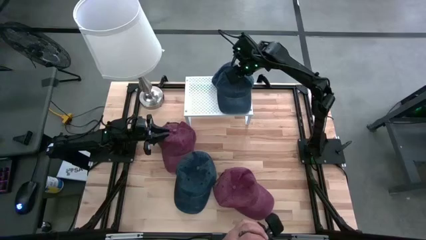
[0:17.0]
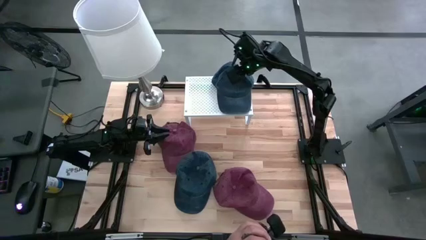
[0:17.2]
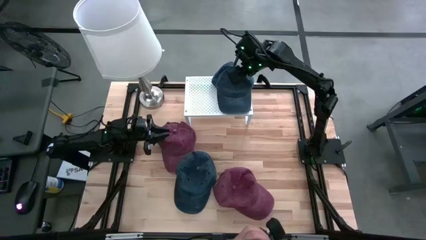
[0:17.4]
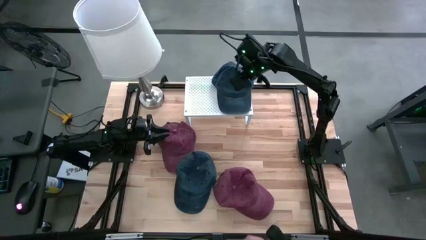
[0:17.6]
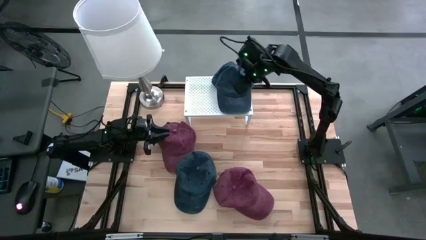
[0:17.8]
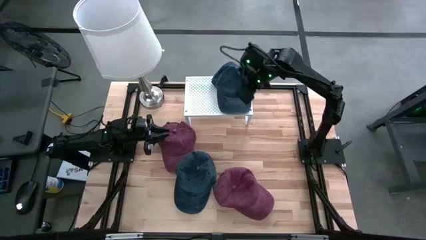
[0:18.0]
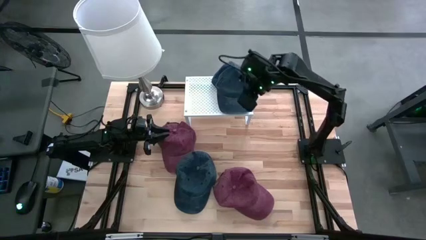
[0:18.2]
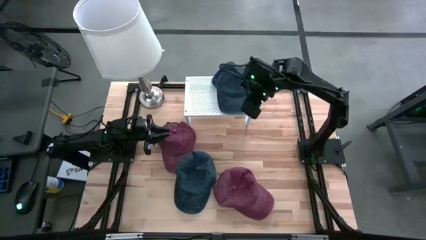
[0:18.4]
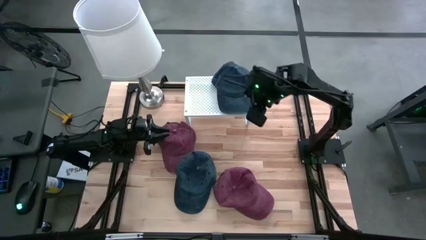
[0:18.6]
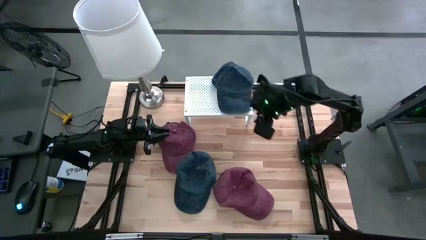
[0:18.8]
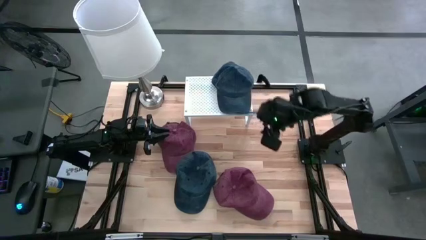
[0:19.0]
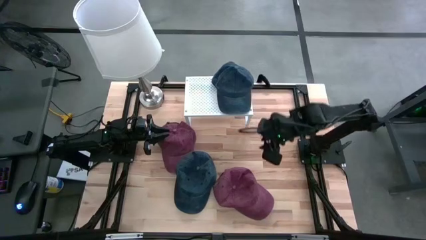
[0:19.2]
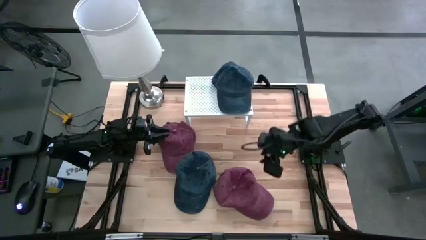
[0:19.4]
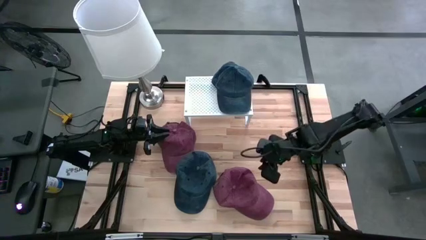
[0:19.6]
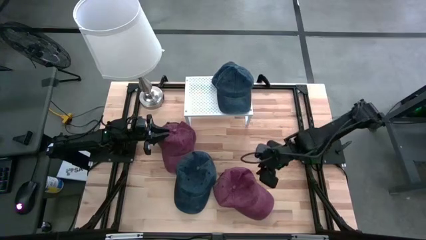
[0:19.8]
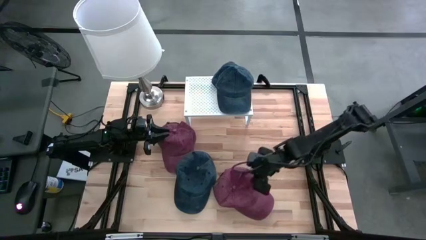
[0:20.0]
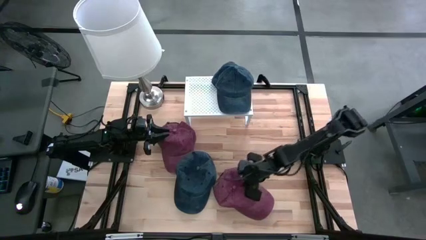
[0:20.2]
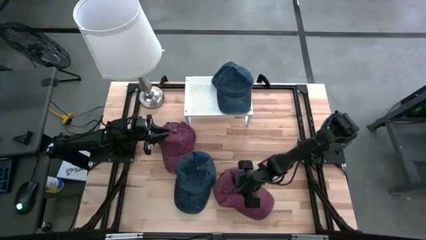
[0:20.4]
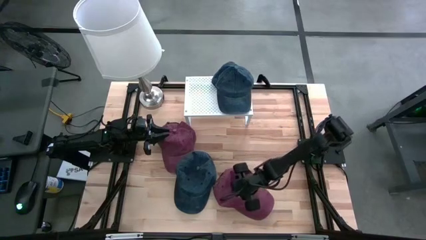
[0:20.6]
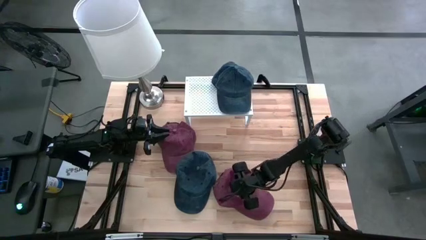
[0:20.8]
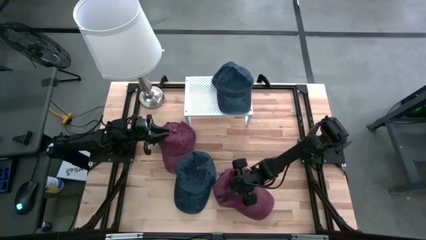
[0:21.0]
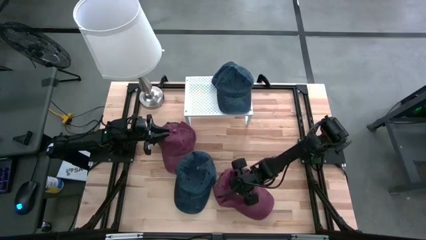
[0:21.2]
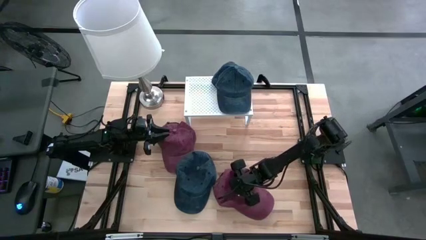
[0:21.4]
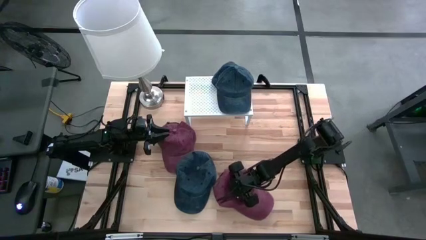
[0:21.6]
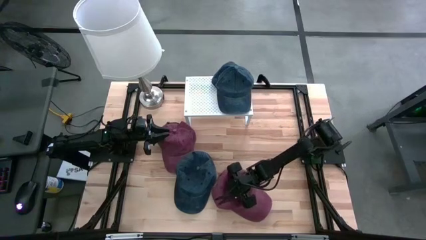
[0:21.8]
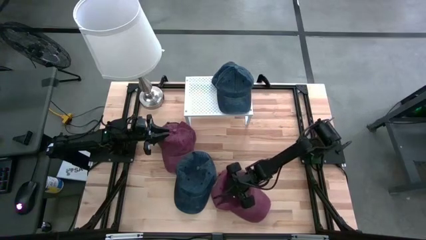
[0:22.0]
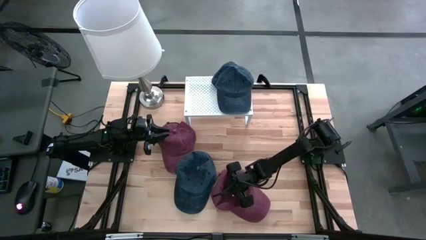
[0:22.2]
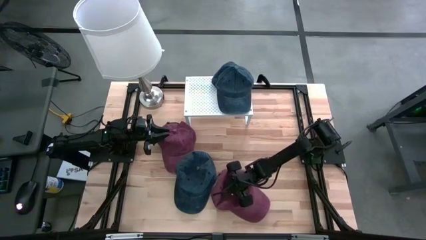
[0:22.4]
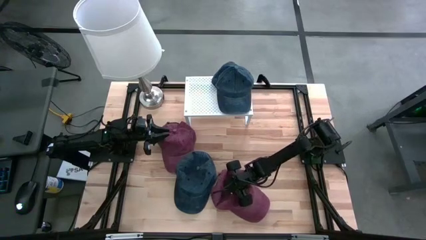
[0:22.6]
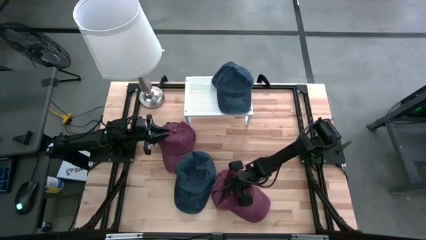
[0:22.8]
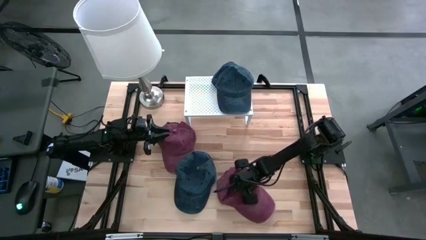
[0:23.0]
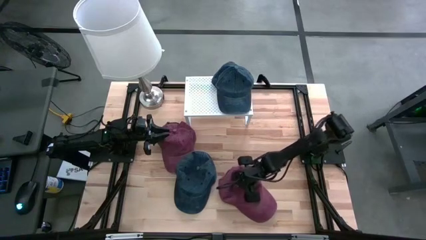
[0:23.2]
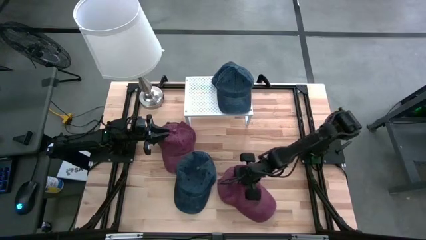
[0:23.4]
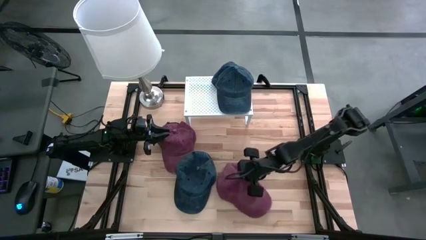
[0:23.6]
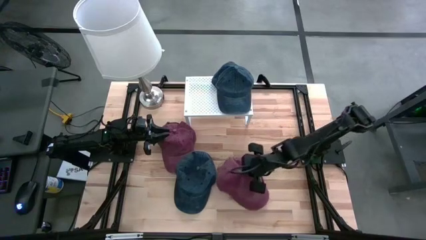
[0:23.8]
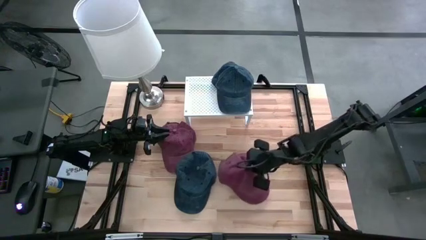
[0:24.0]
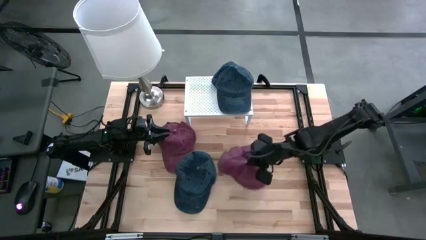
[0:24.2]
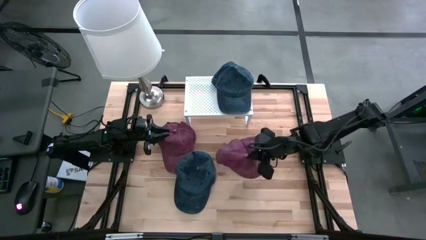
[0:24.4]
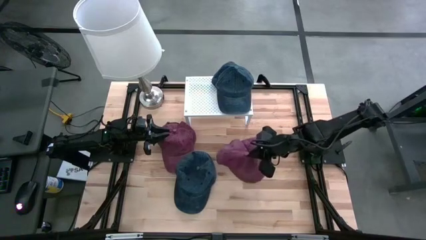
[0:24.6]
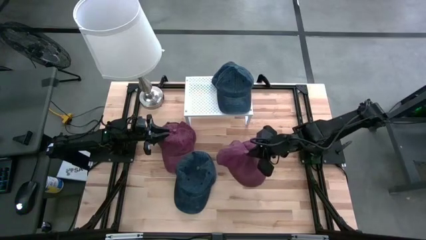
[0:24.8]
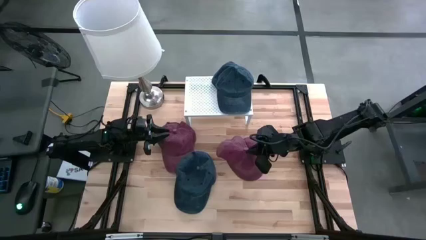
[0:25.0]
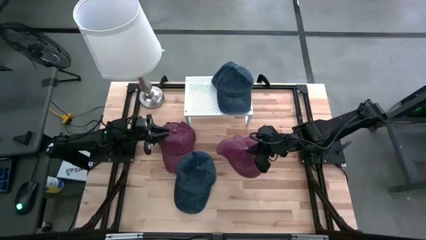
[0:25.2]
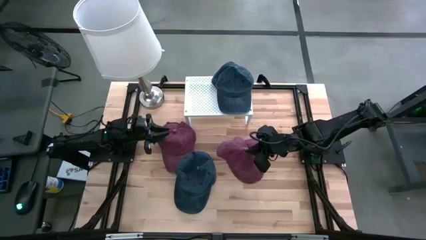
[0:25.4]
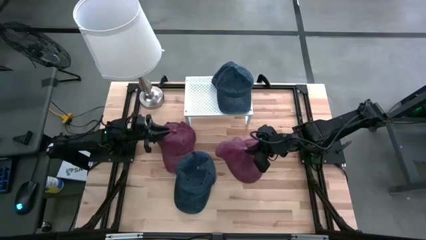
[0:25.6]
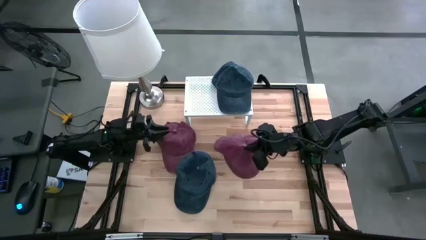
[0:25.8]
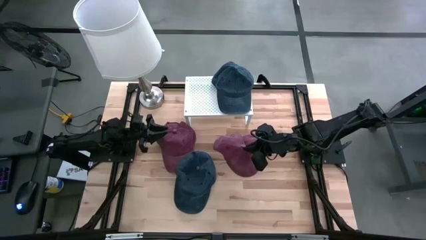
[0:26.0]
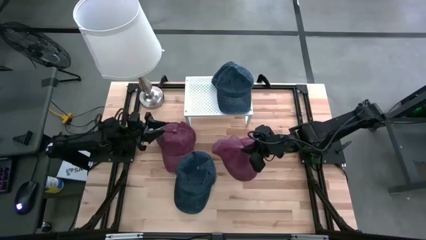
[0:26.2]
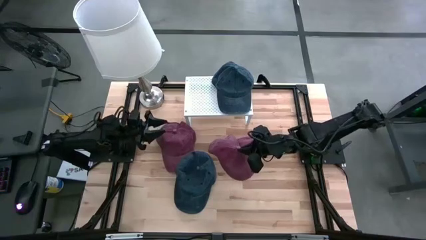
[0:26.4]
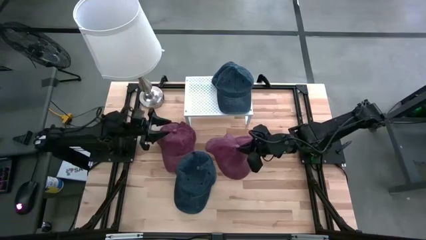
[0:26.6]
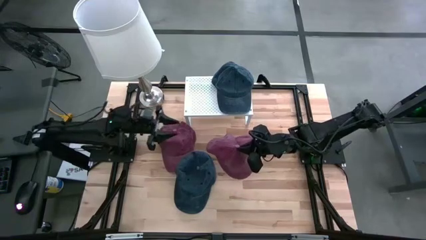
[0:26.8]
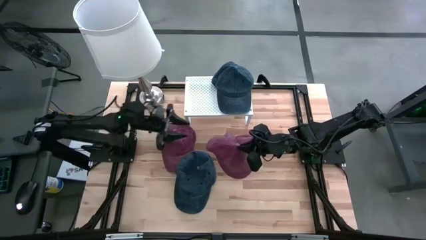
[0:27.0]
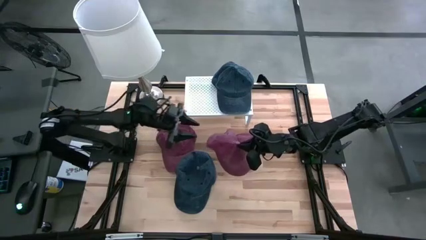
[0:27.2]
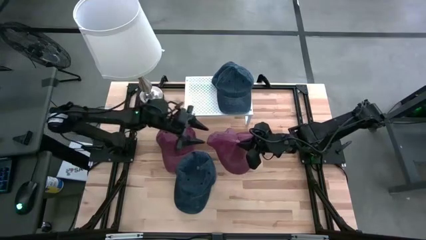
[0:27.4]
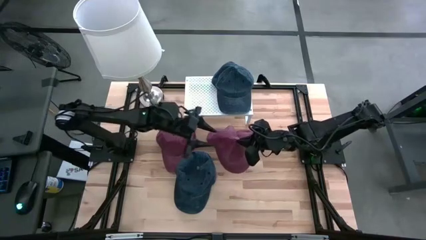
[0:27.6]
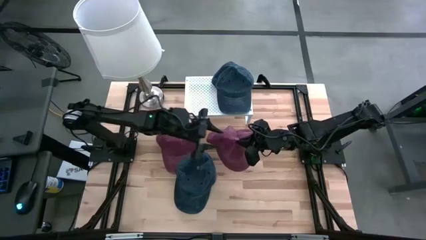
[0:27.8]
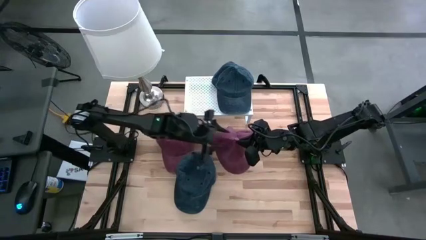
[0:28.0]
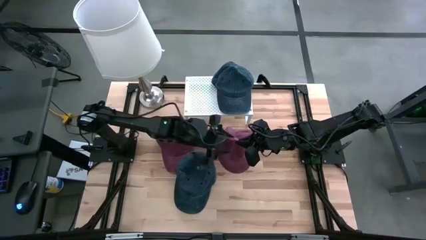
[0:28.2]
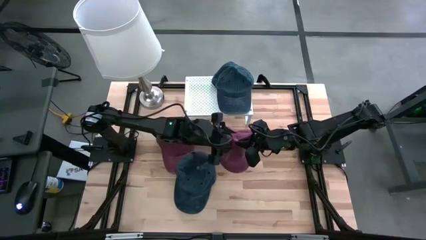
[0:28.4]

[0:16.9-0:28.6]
Task: Pick & Place hat
Put the bottom red cap on the shelf
